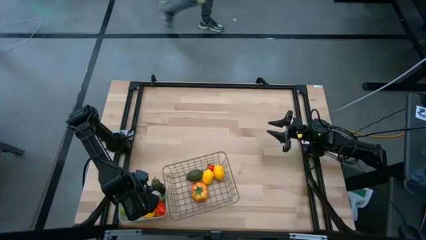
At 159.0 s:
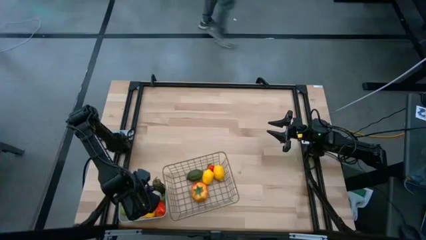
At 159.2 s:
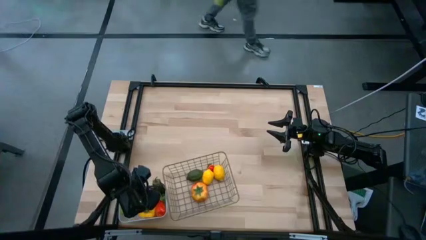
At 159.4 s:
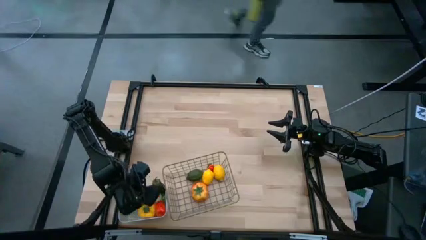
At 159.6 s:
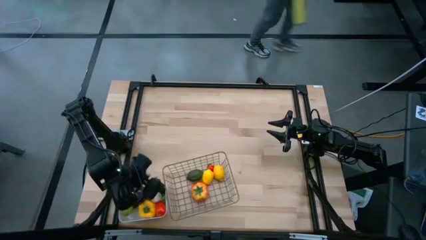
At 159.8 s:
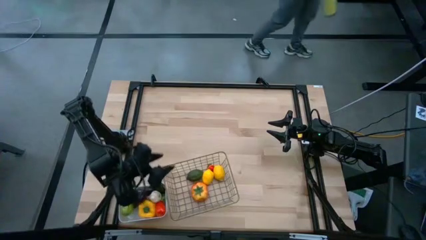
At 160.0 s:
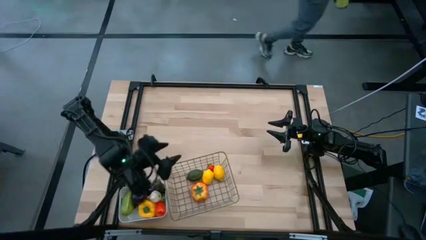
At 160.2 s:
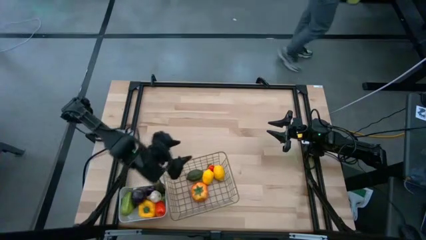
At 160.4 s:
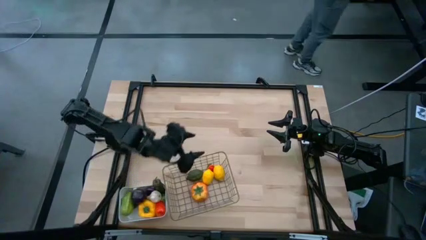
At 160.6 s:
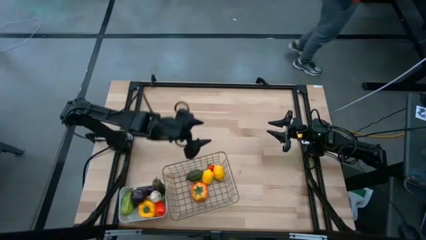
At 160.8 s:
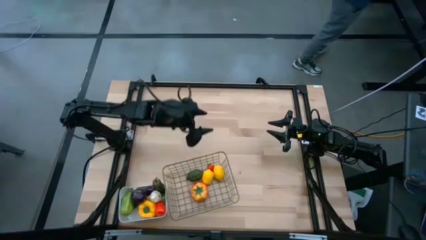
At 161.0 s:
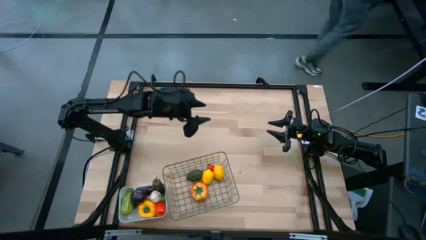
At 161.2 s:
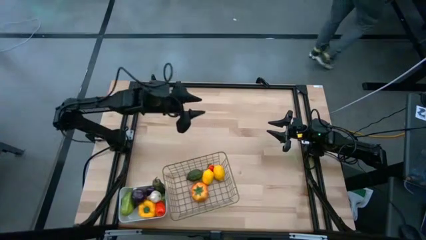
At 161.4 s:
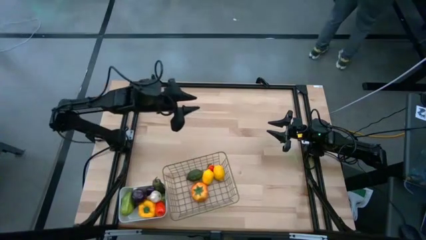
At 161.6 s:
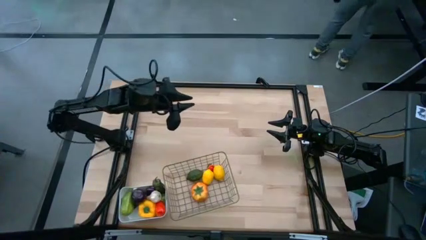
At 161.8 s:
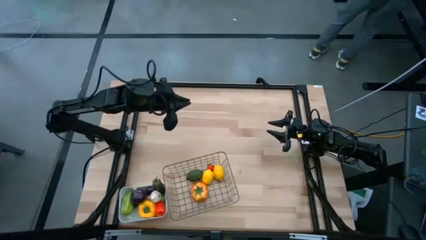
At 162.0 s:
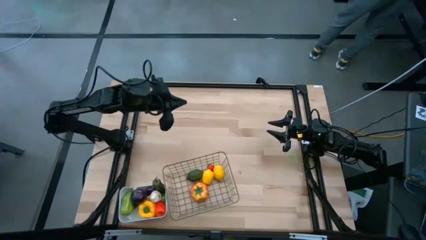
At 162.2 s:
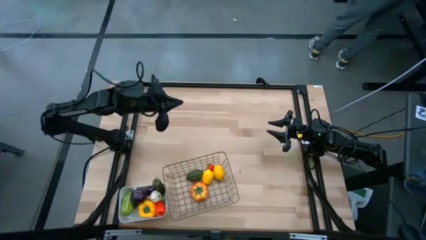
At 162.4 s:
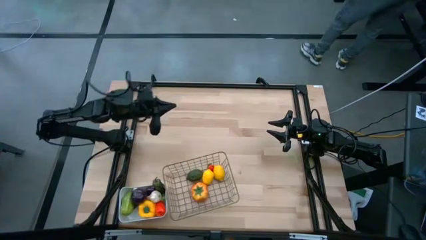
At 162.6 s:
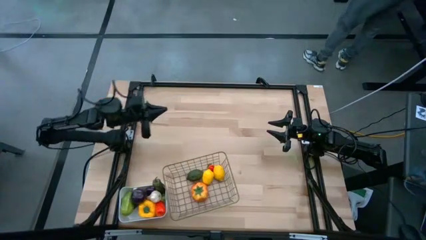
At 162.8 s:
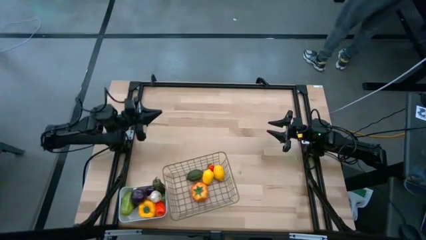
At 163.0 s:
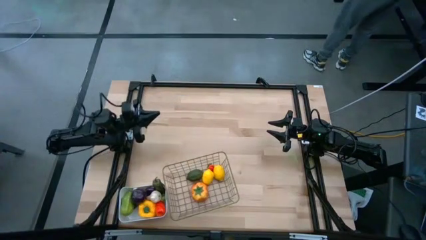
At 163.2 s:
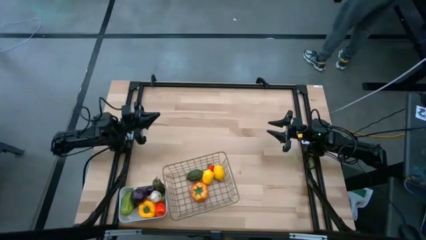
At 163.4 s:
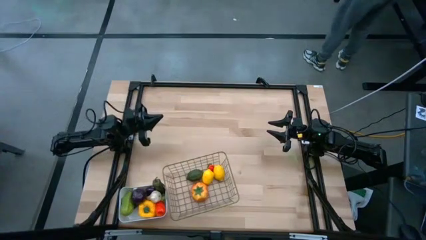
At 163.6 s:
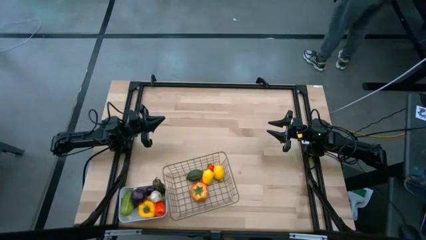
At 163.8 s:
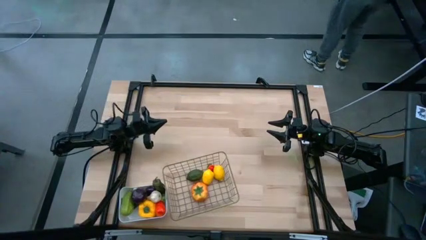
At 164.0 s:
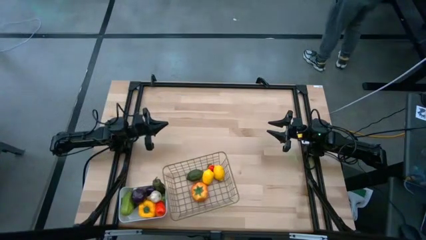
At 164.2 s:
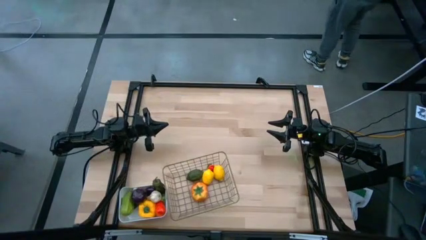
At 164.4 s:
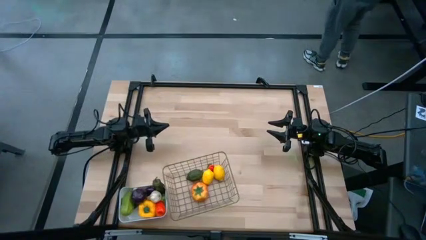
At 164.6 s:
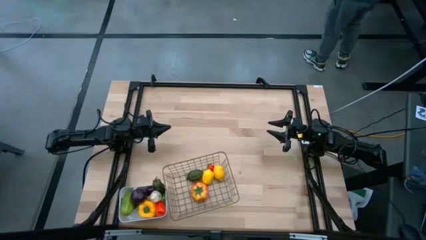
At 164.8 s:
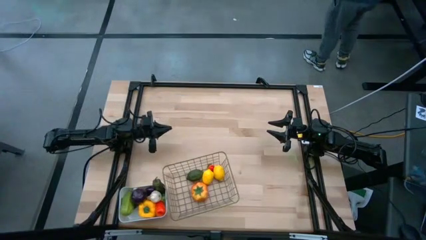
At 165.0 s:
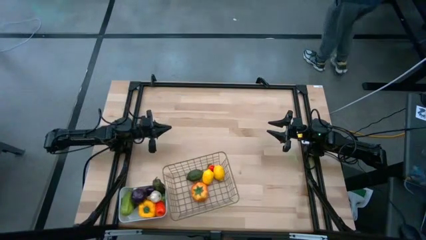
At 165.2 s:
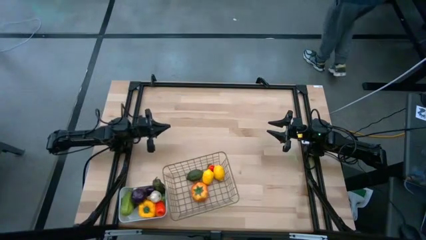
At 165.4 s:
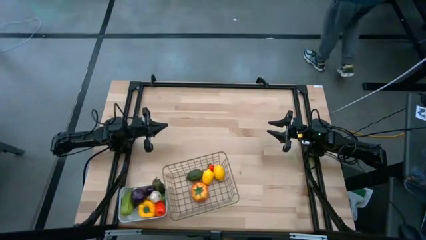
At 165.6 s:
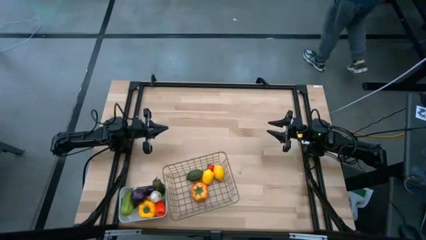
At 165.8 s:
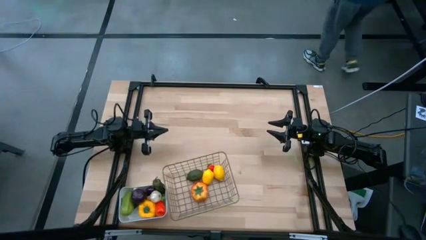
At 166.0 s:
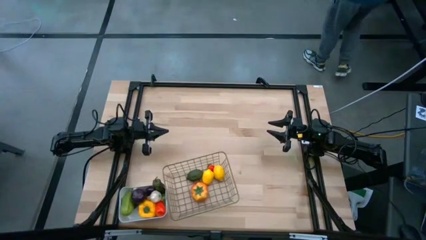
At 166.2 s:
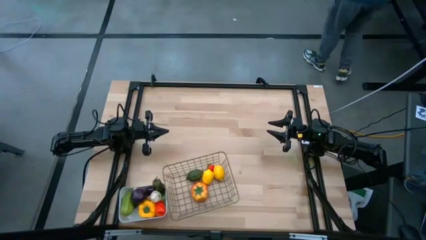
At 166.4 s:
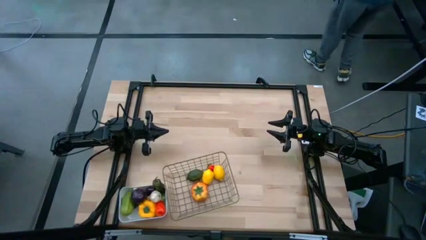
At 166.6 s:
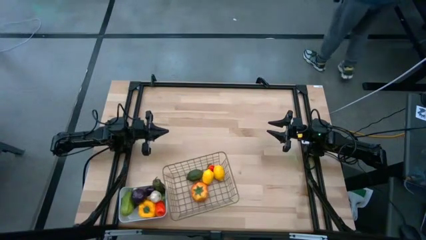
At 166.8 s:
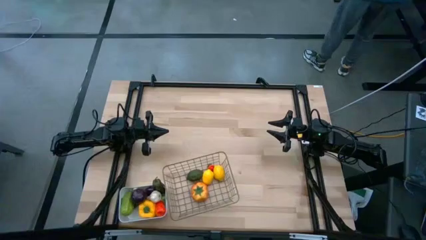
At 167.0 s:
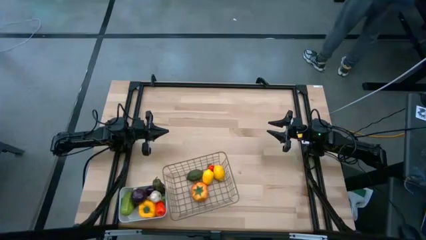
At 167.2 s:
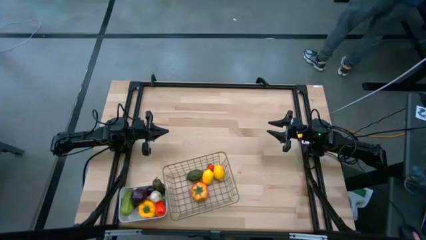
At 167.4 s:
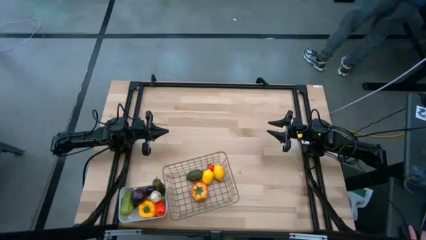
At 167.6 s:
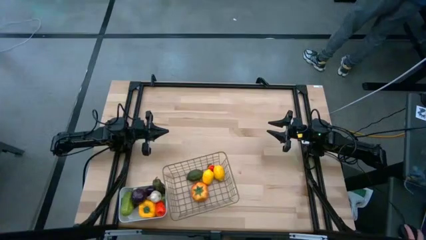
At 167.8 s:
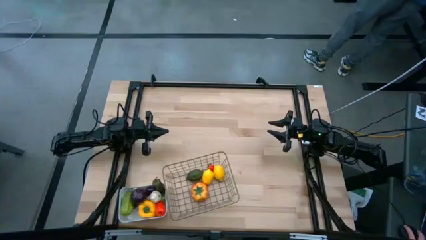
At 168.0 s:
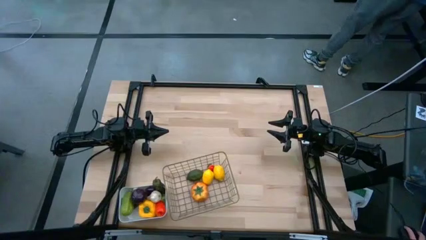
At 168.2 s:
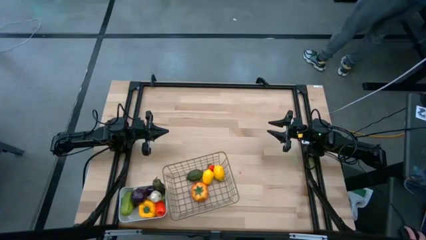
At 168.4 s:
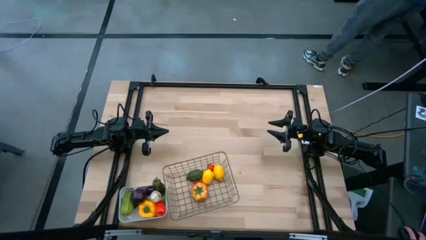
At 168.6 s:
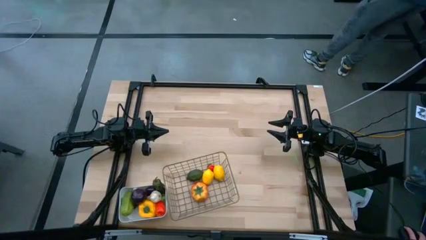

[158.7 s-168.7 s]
Task: Sort produce into baskets
Return to Home Position

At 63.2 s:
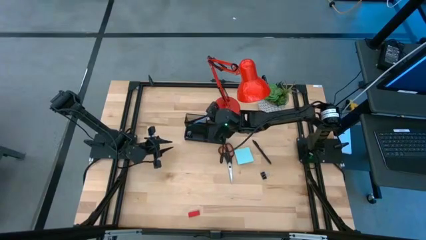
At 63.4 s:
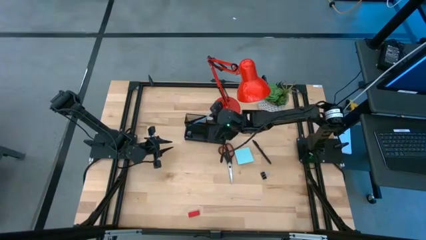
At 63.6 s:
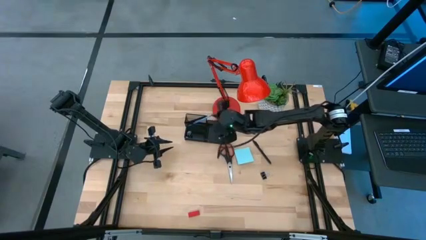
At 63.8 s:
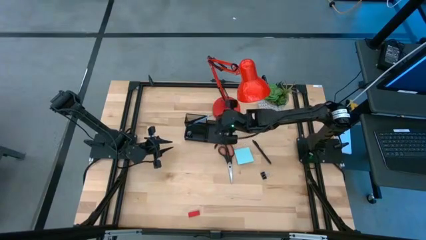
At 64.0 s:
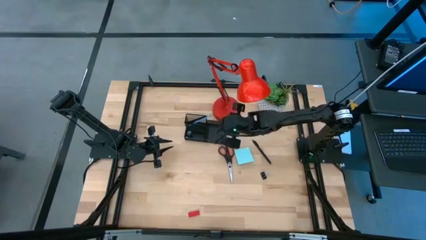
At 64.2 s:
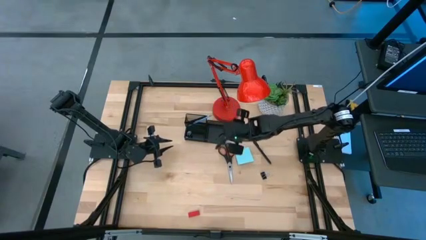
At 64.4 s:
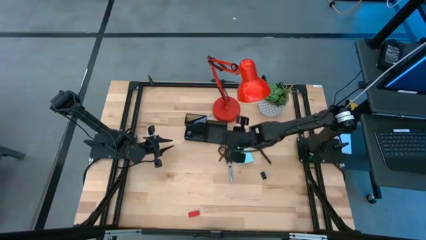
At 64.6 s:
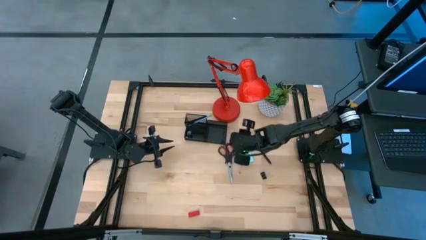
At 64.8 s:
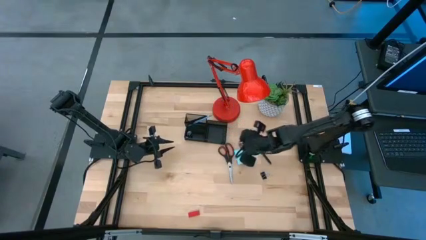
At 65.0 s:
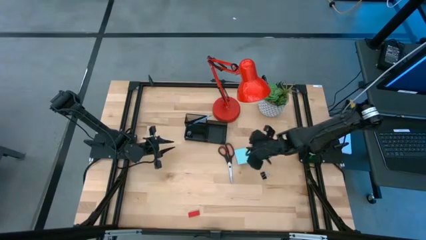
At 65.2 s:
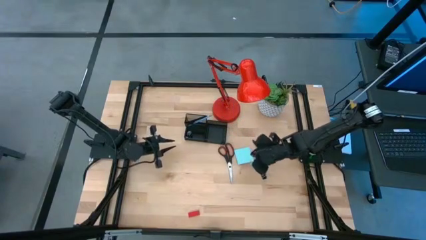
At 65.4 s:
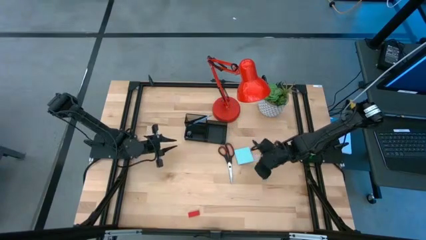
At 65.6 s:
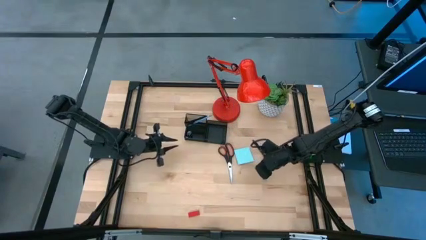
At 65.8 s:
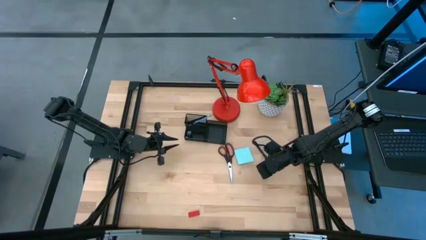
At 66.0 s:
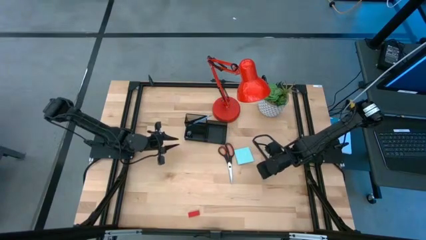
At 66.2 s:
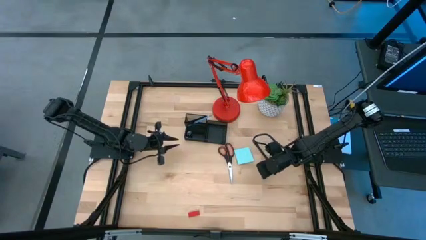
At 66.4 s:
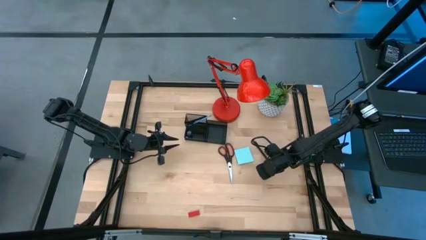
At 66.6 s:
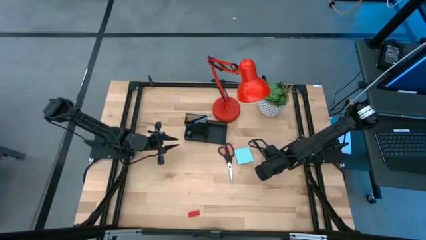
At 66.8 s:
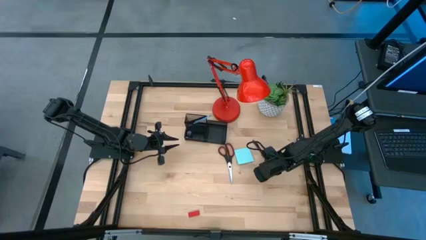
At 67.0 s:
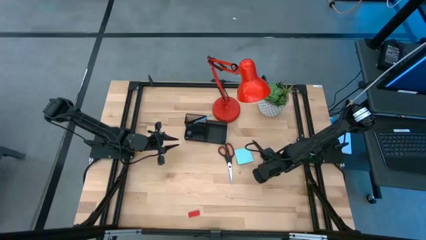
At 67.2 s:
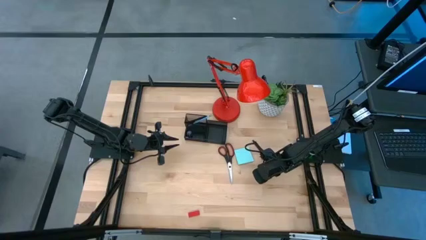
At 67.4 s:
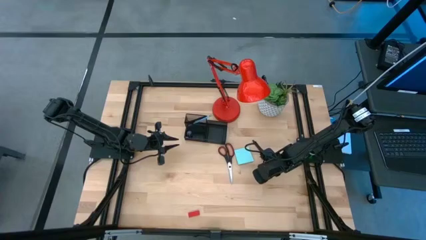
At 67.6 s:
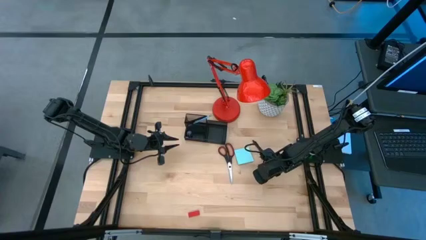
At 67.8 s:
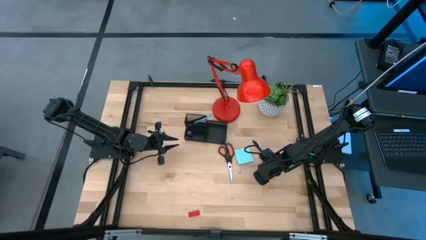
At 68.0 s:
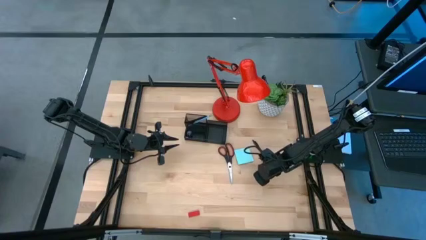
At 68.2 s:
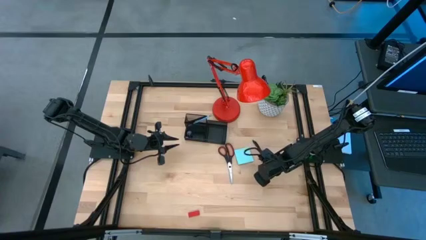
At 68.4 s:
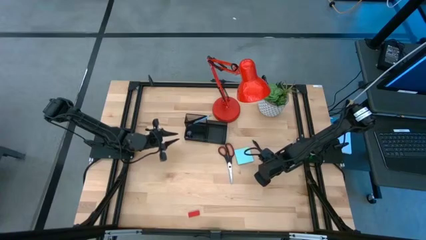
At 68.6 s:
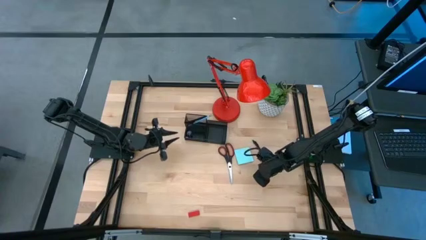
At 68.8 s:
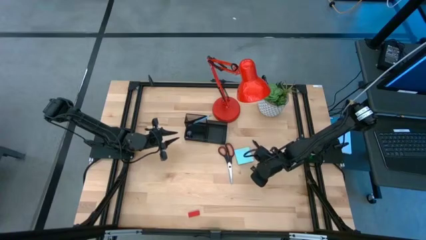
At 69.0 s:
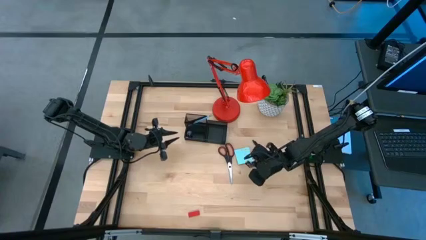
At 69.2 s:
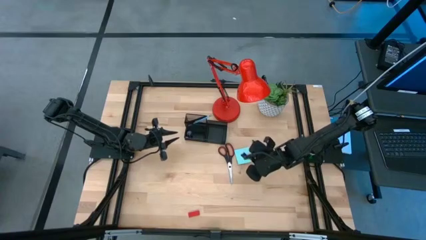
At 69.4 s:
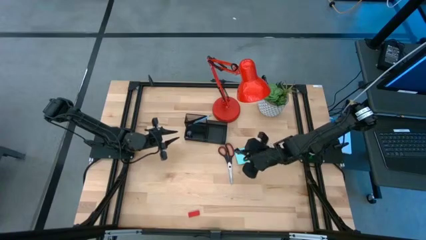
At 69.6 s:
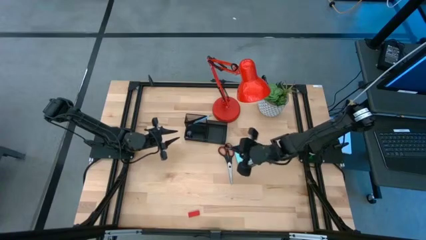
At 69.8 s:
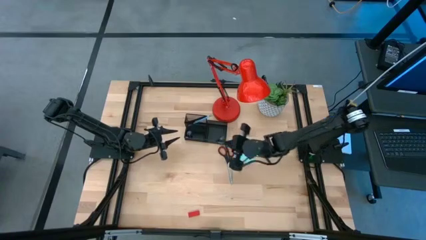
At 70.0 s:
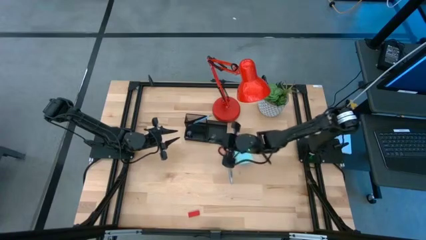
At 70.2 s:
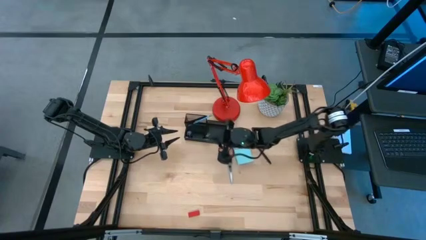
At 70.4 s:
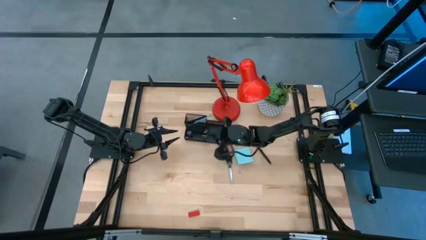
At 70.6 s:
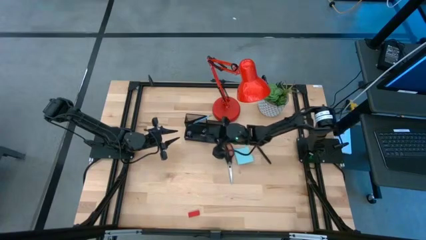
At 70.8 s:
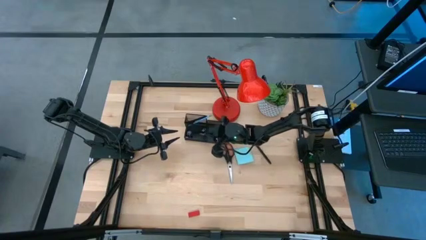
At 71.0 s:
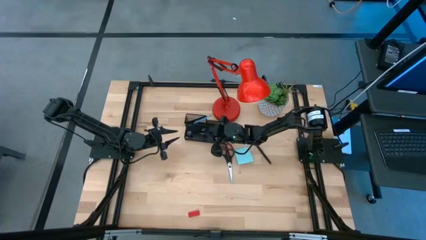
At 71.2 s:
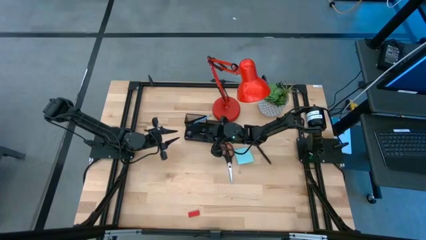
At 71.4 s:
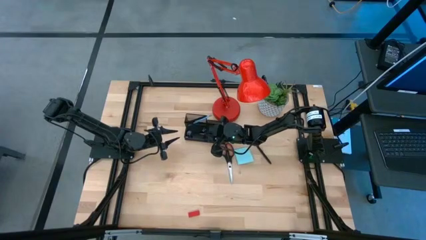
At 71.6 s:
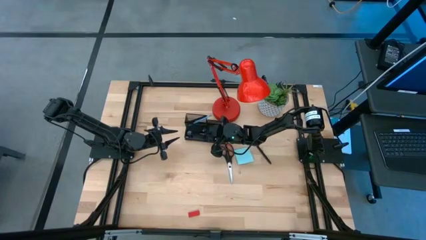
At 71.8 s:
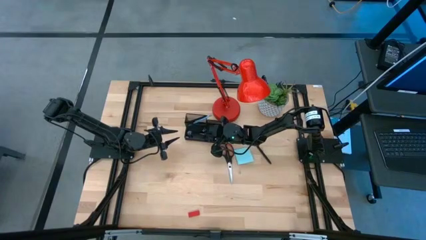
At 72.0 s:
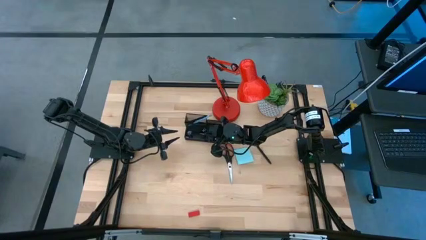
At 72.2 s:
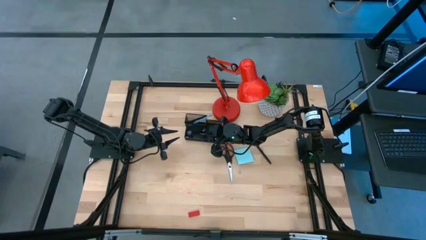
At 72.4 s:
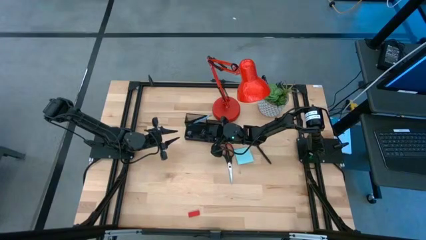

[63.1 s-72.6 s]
Task: Pick and place office supplies into organizer
Put the black binder clip into the black desk organizer
